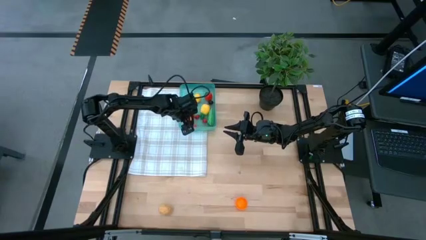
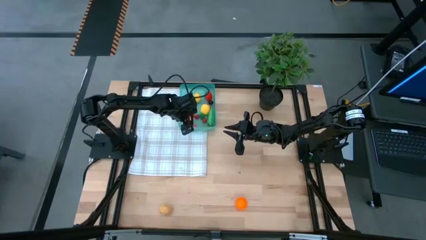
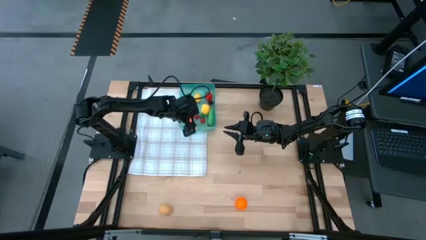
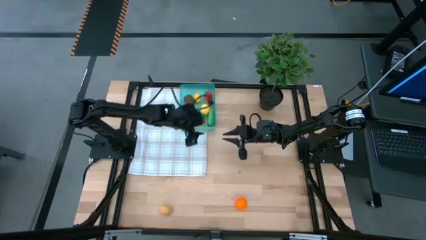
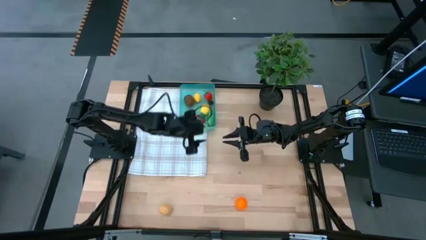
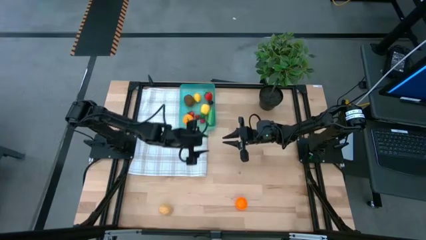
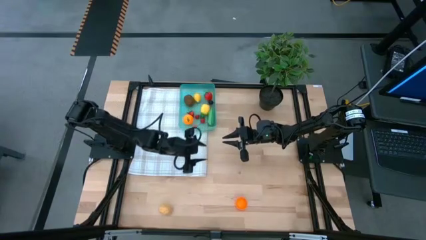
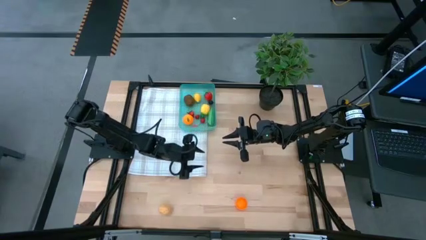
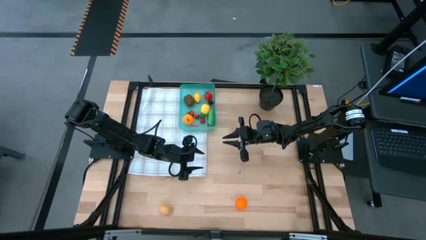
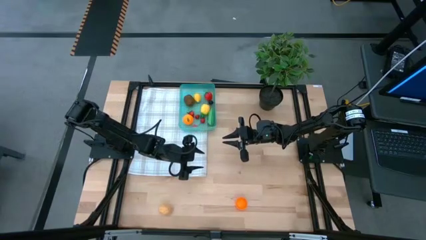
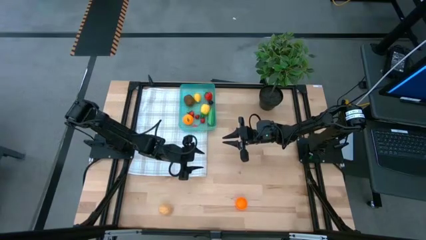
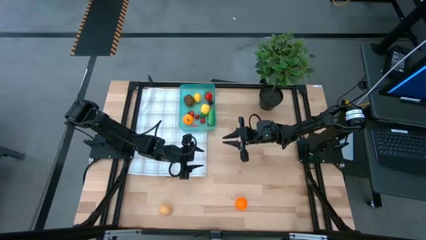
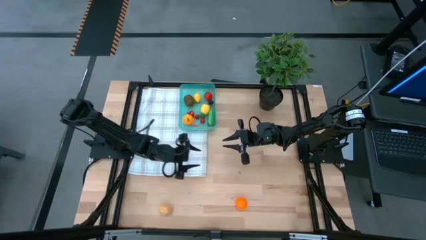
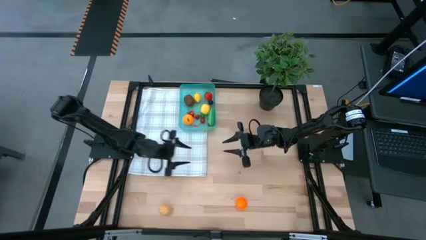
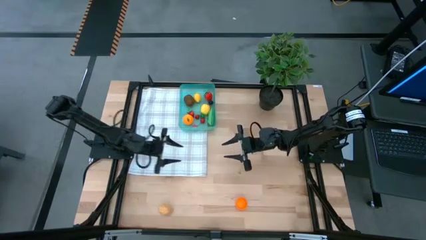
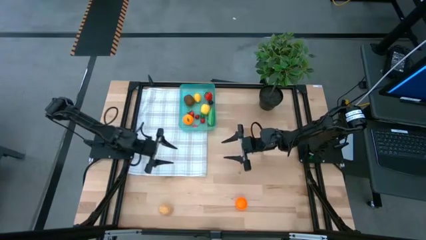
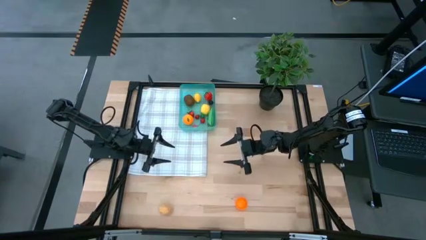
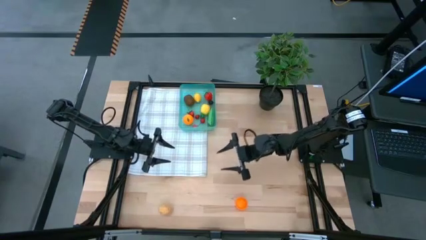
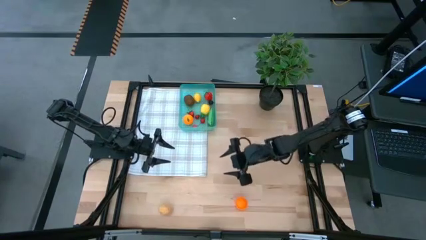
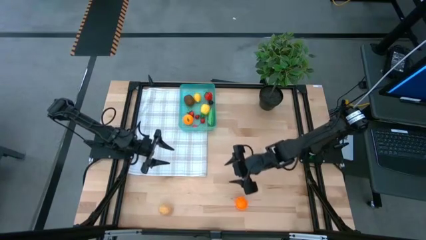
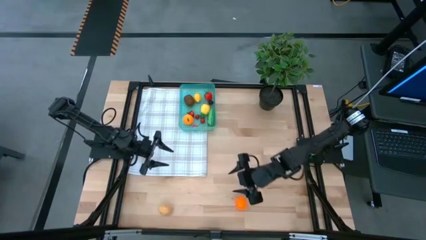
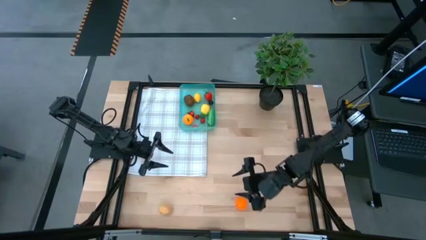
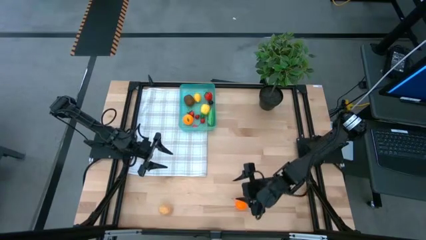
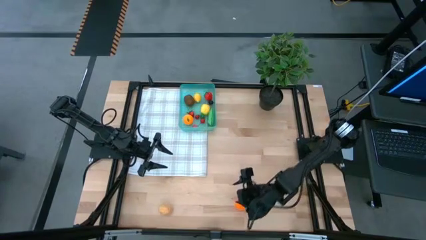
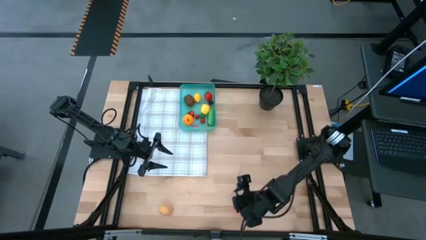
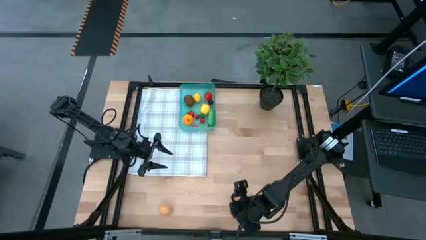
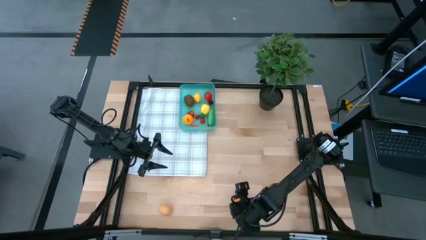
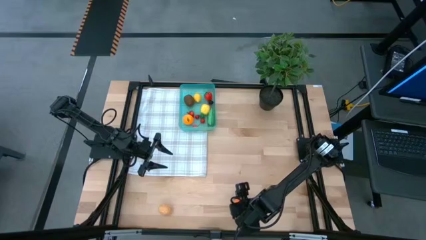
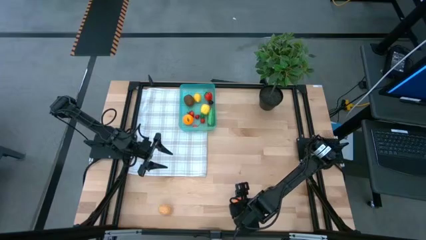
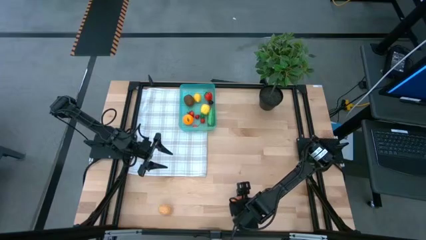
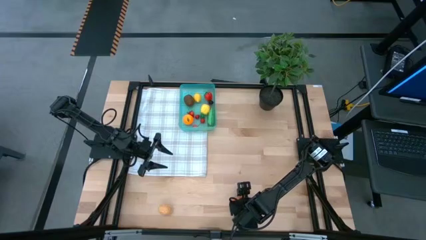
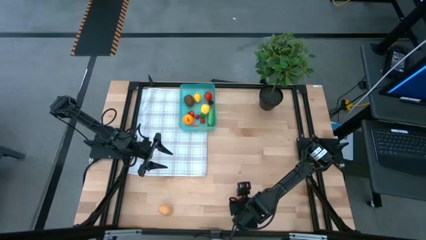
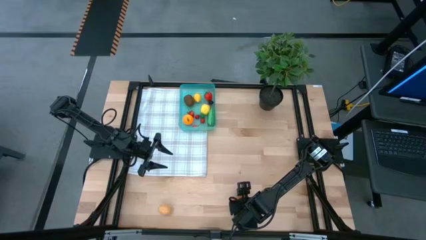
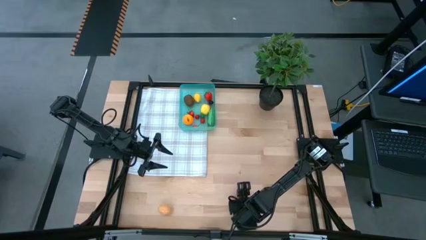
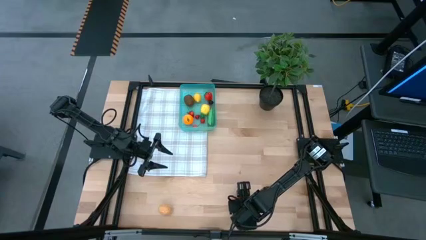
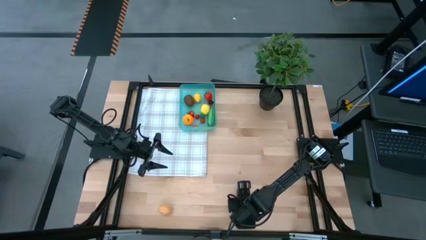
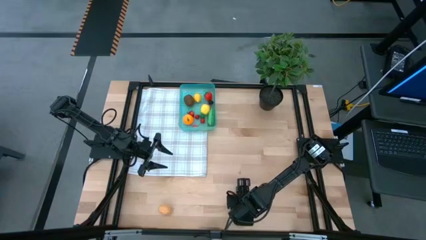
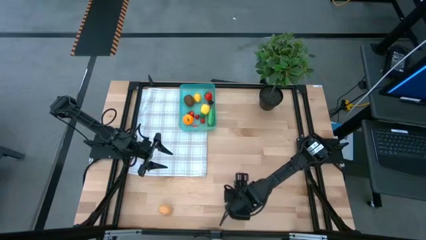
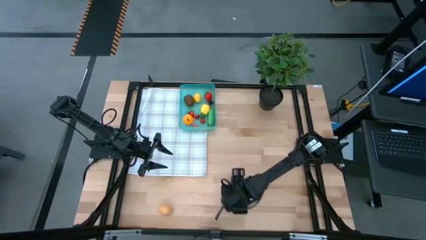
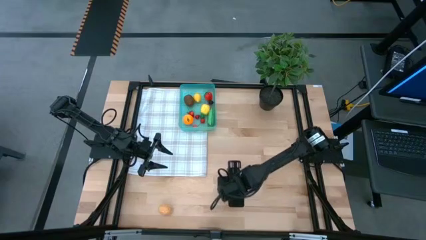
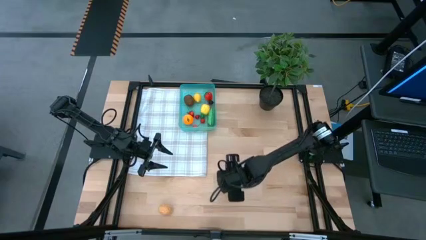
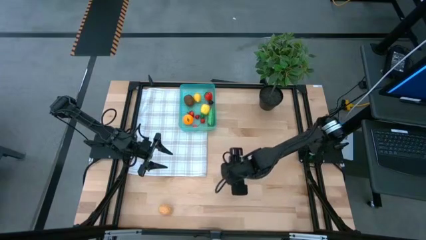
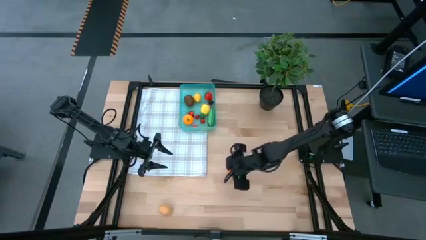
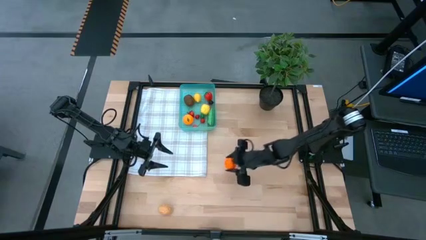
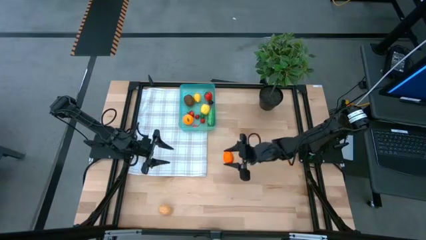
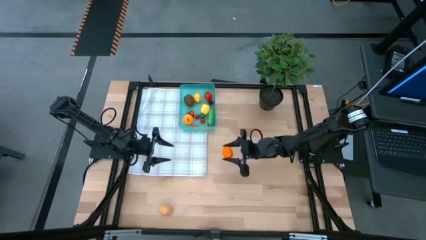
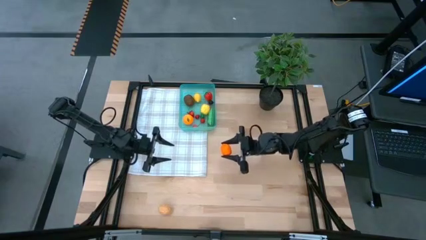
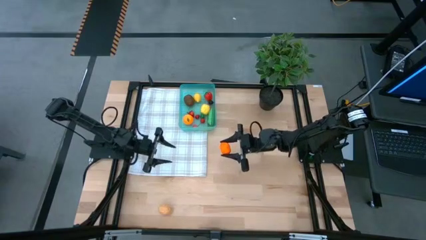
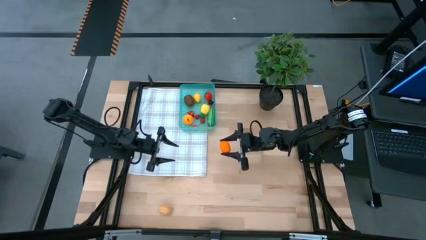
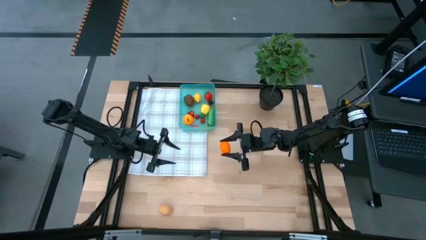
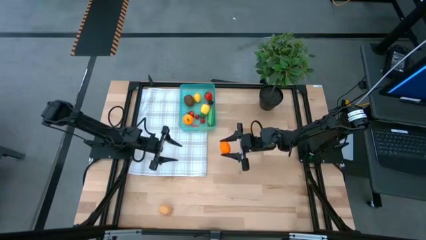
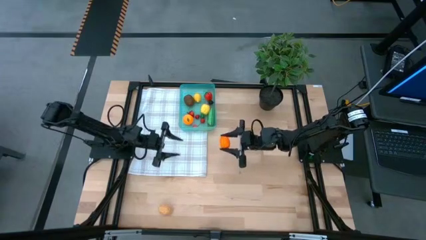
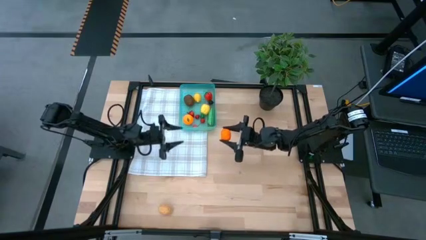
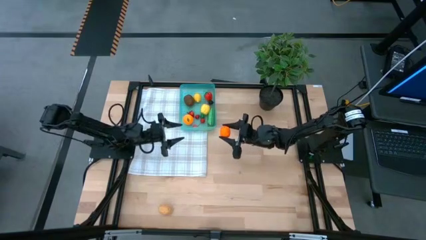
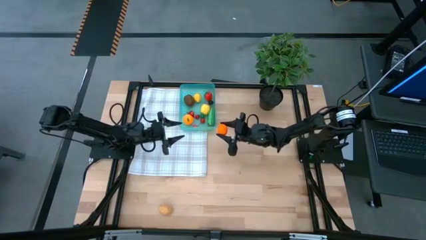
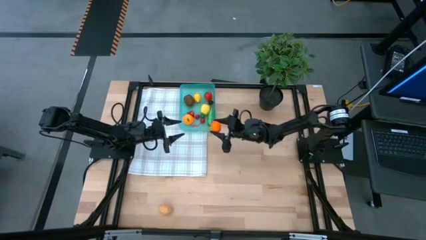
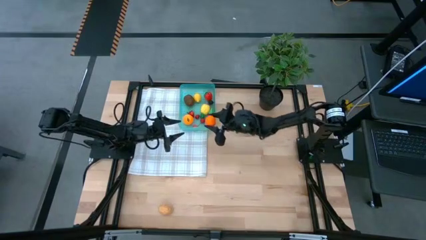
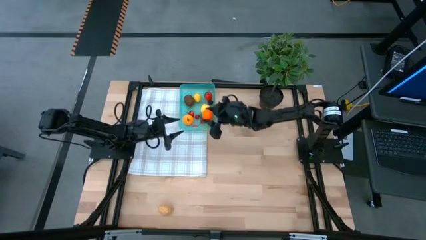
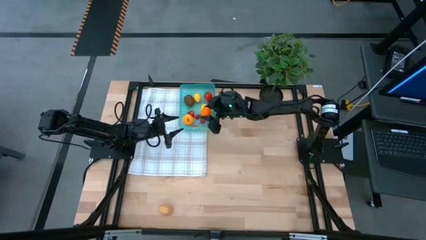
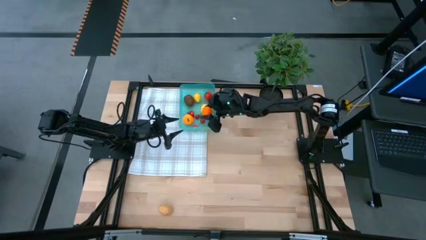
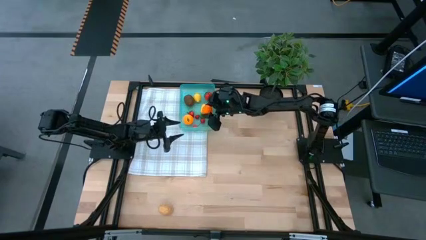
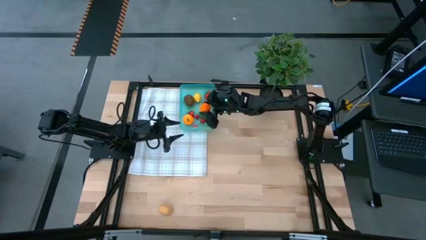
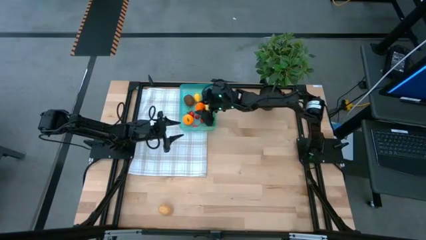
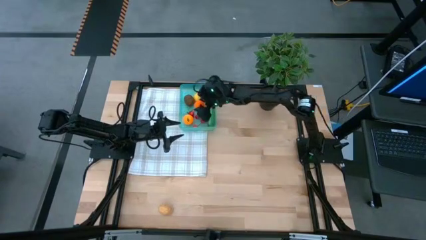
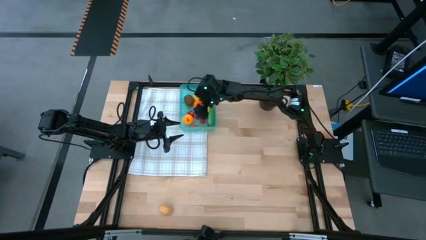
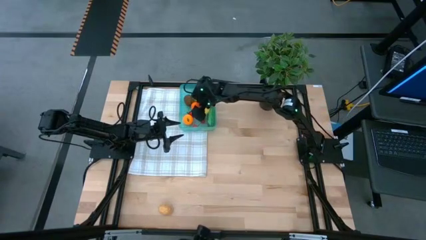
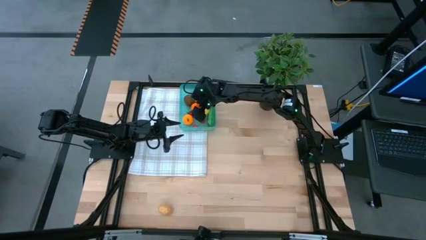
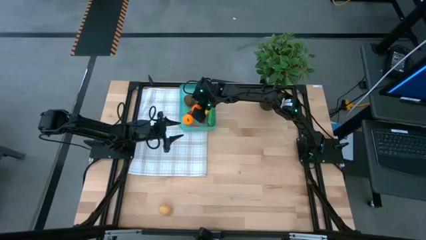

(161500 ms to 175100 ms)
Task: Pick and placing Produce into tupperware
Put the orange squash into the blue bin

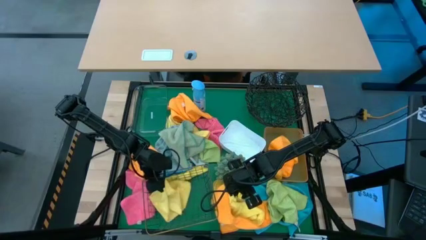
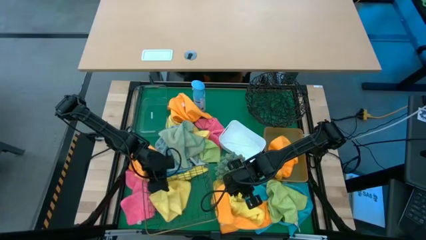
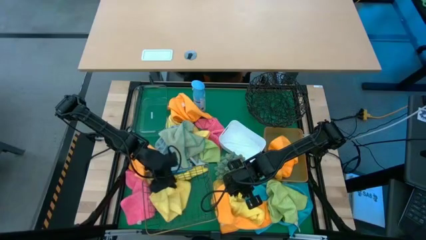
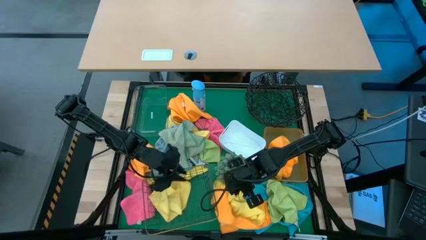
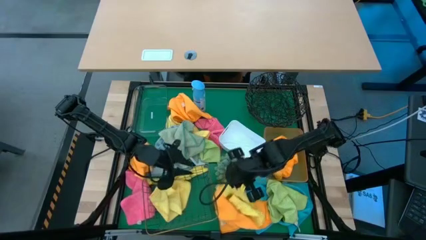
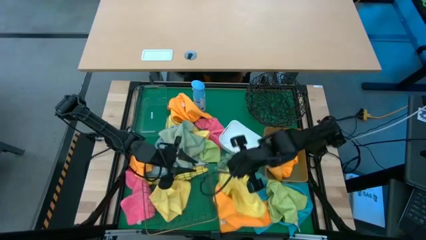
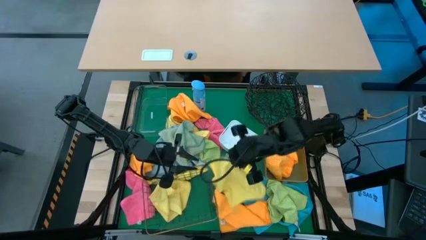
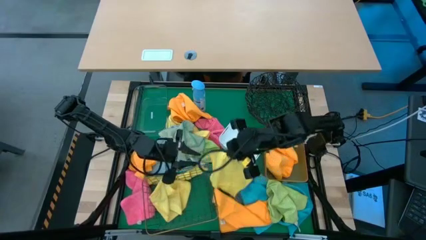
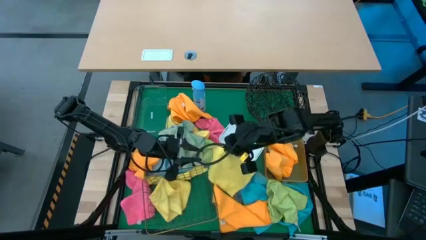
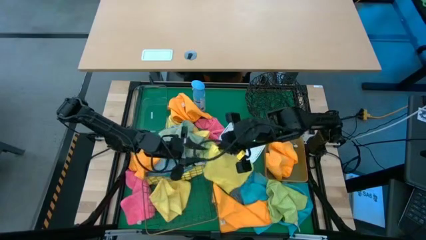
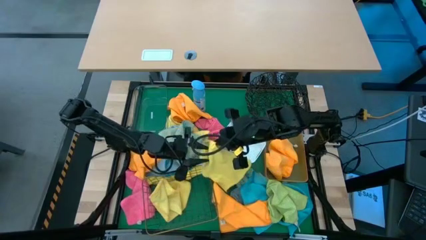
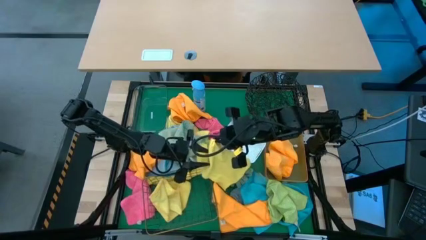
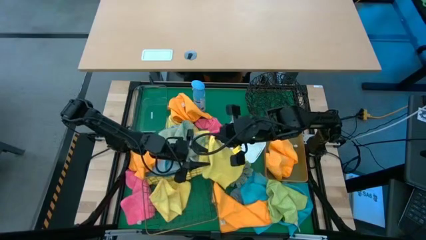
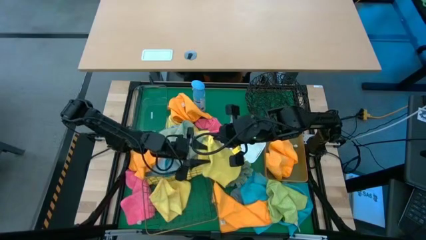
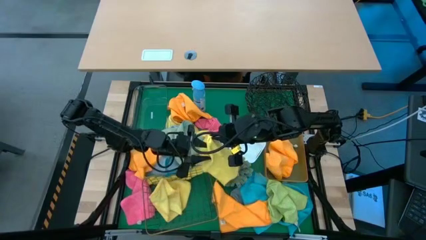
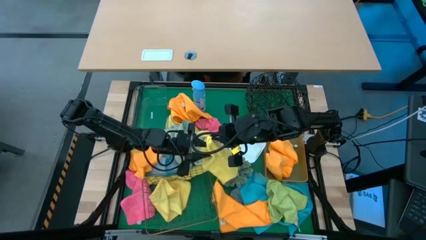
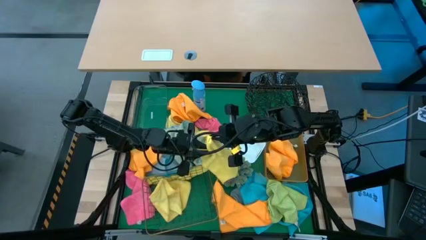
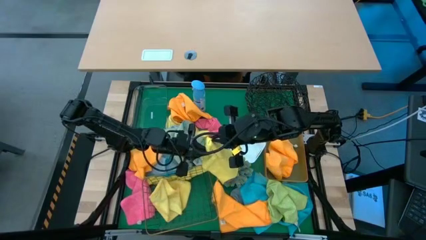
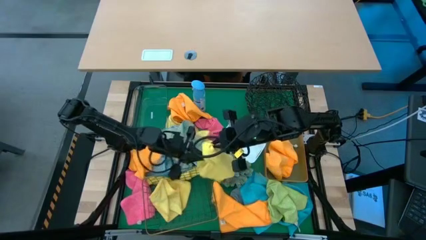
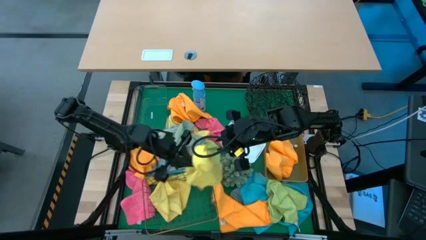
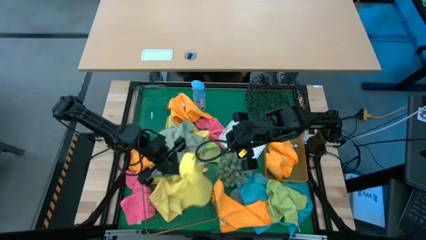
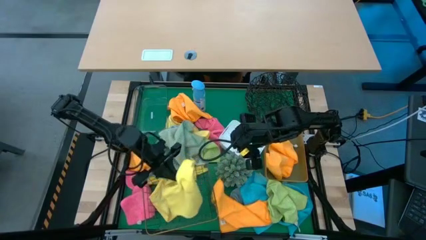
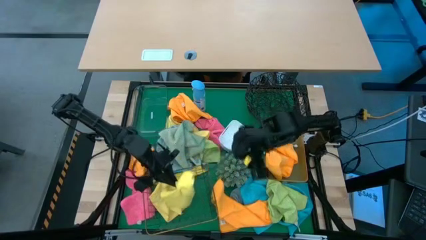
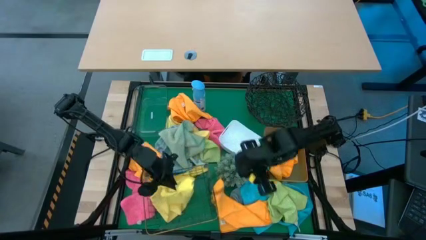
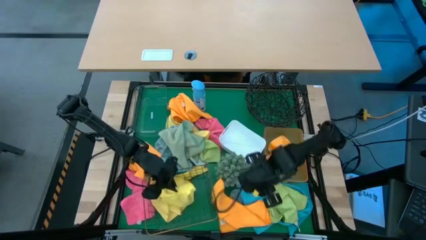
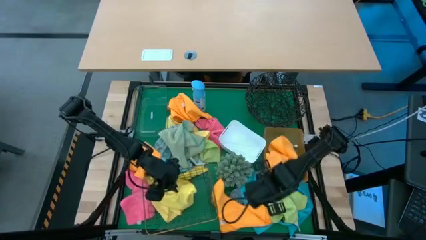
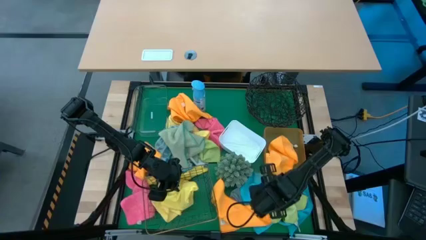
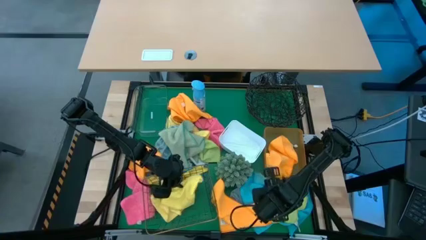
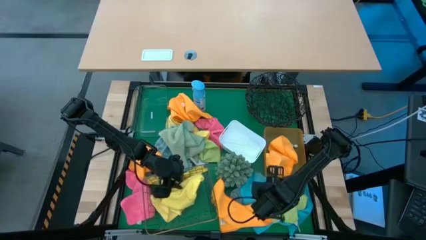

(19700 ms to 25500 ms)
Task: Sort microfiber towel by color & place in baskets
Put the yellow microfiber cloth into the gold wire basket
